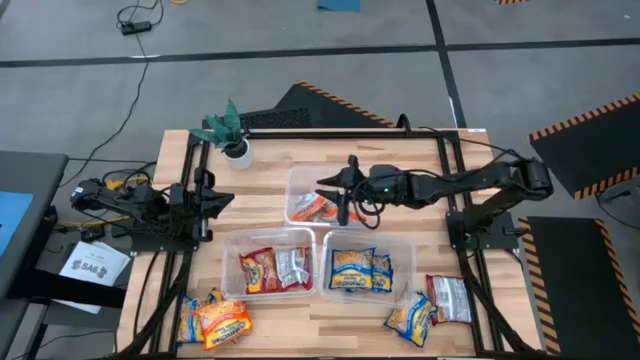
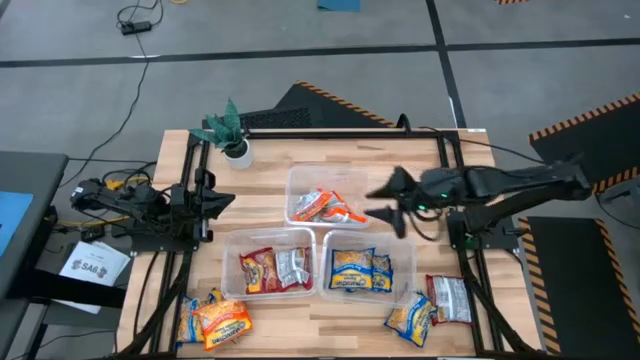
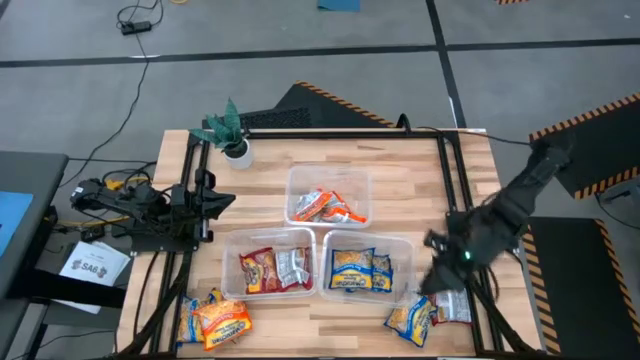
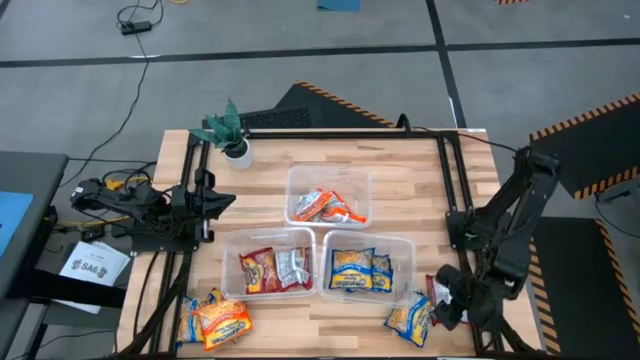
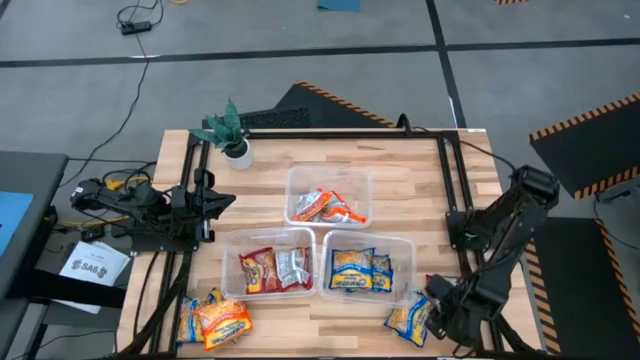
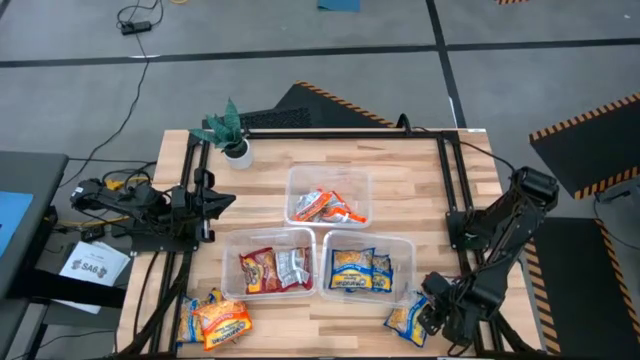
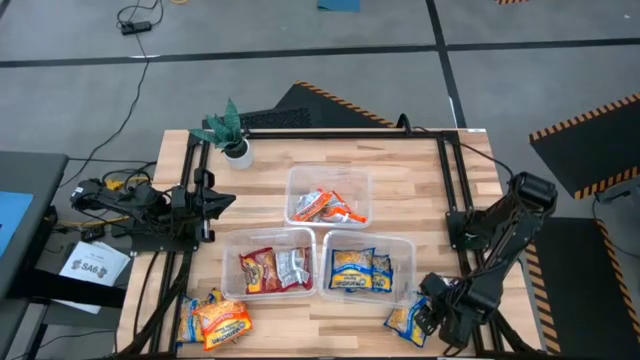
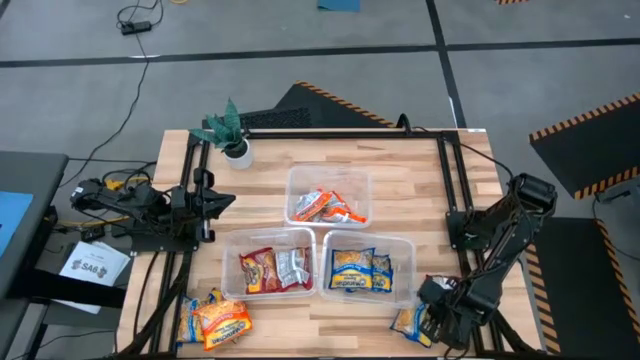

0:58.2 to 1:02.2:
Task: Sort Maruchan noodles
Put the blue noodle pack into the bottom right transparent bin

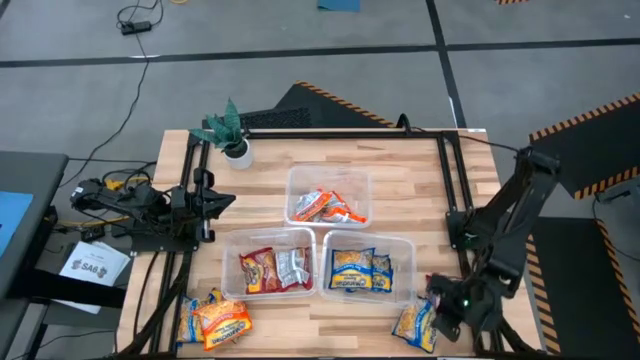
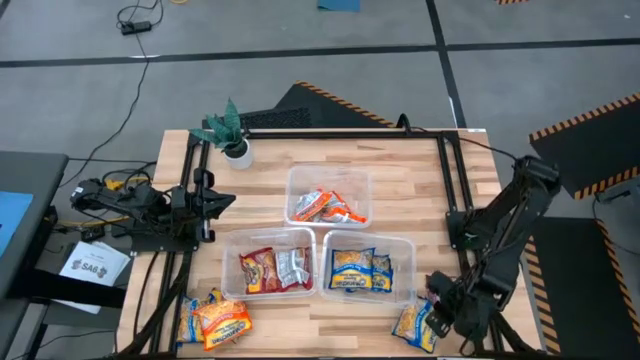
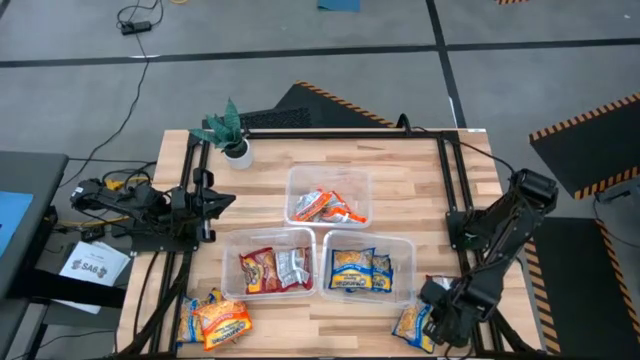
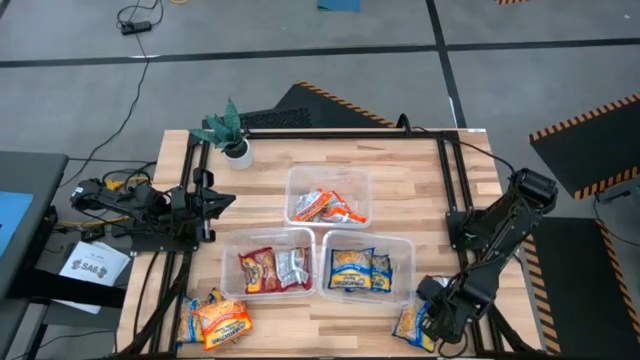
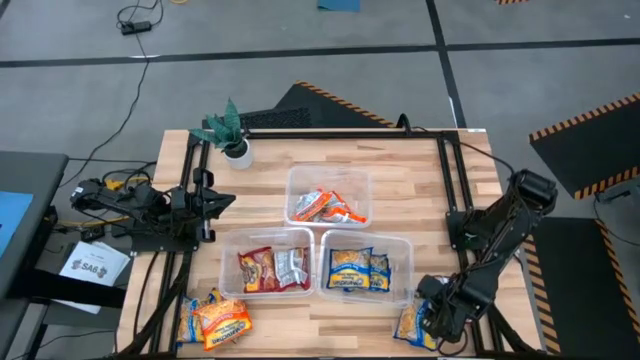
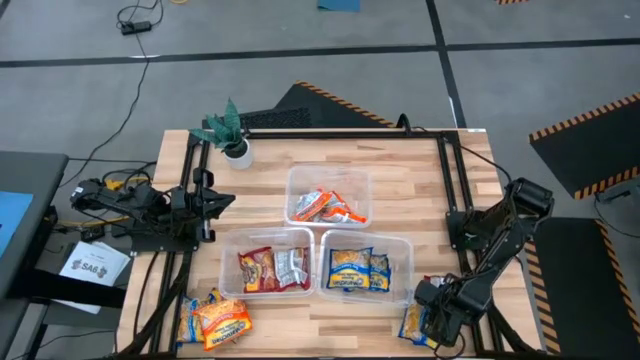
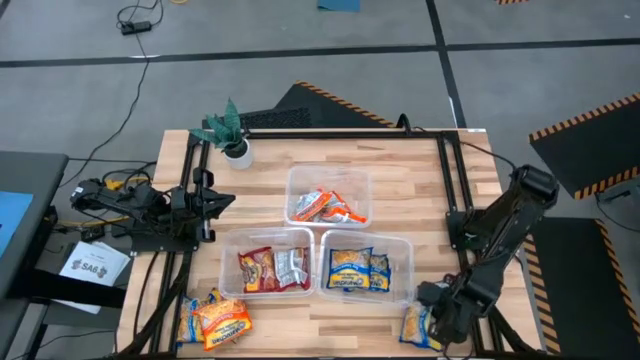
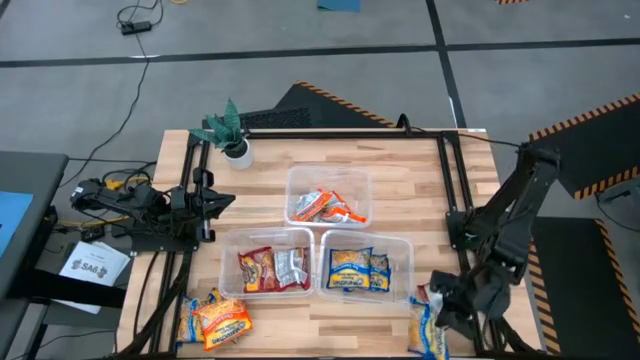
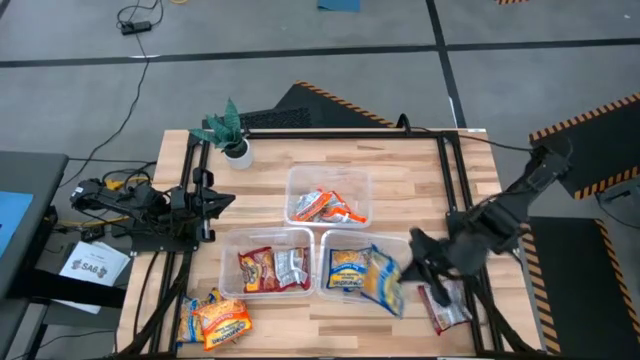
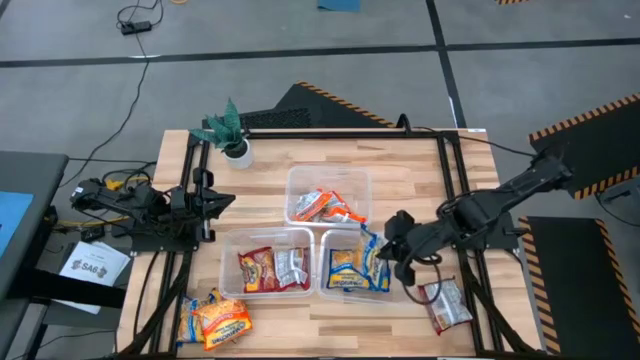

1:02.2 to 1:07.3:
Put the blue noodle pack into the bottom right transparent bin

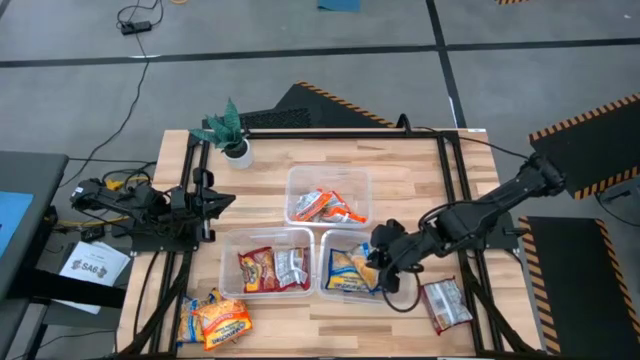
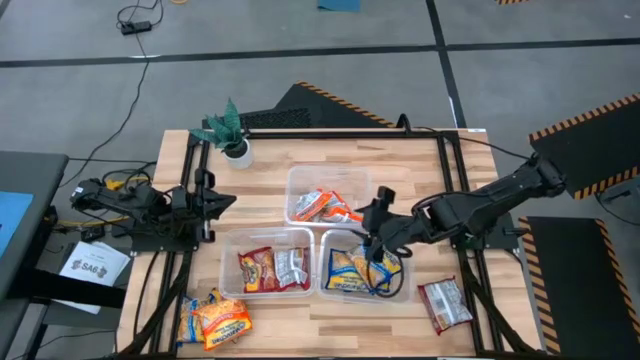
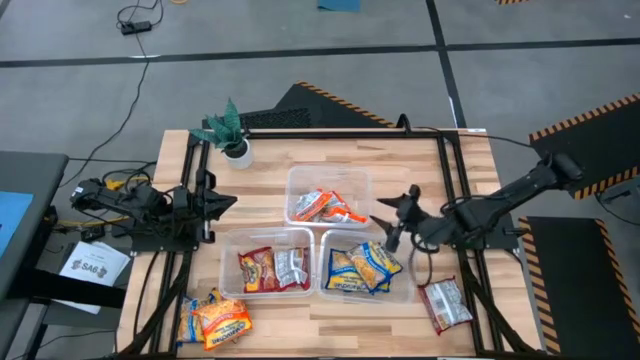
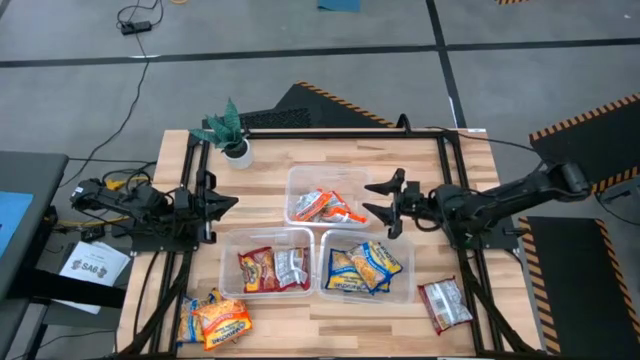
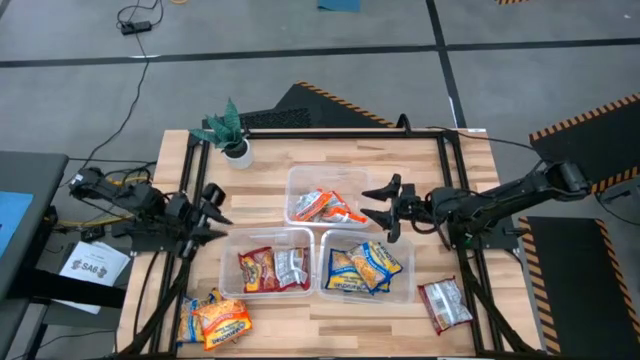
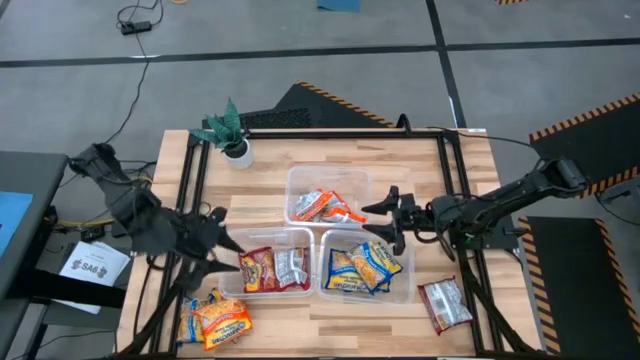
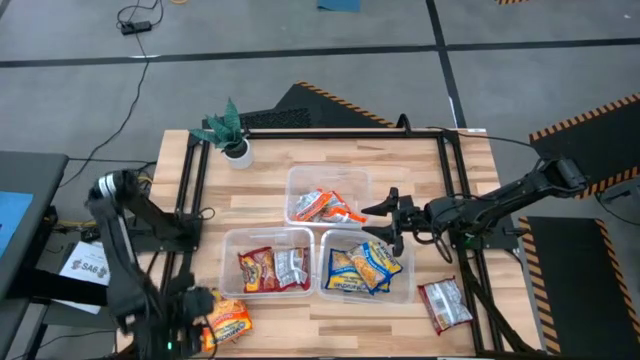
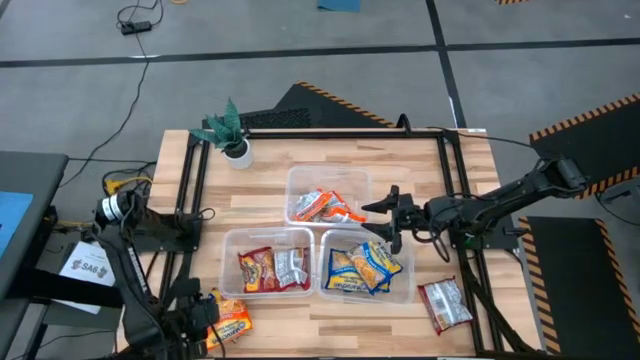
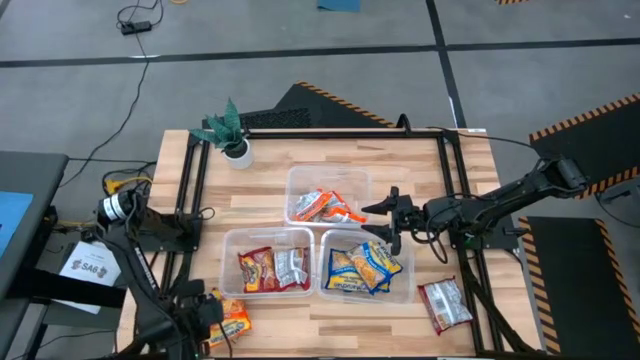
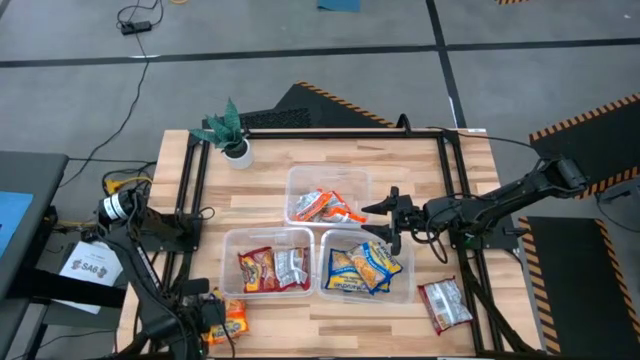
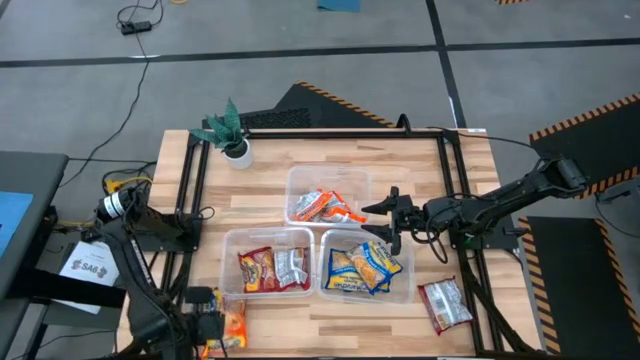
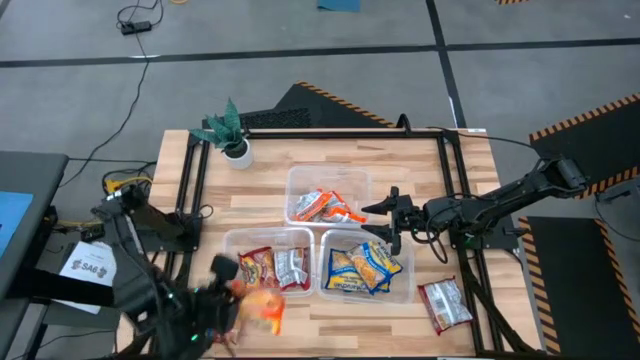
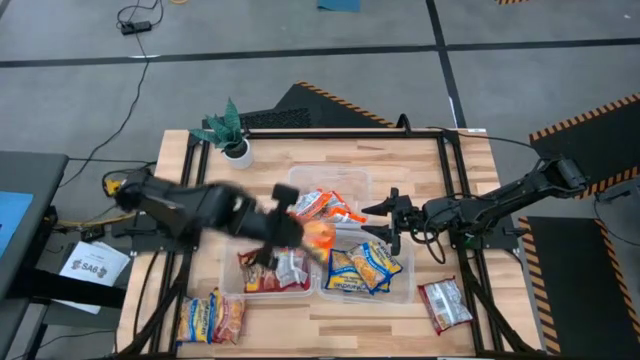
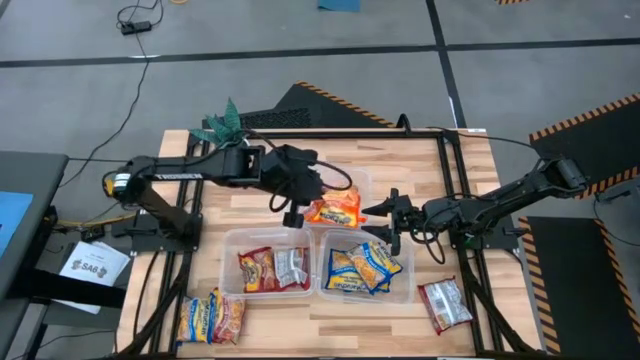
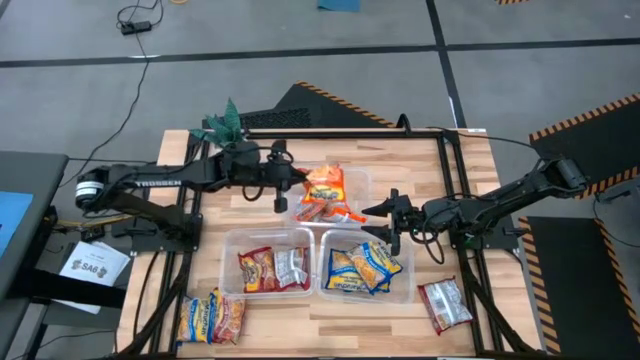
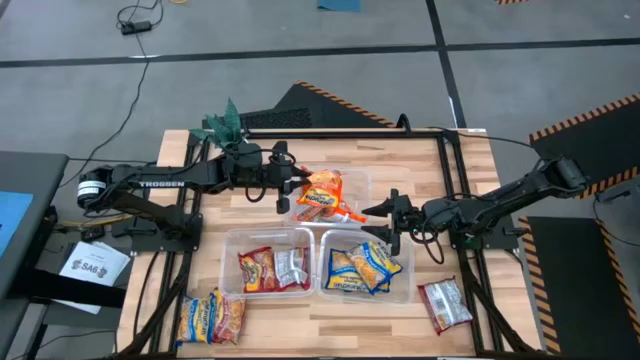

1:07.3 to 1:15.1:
Put the orange noodle pack into the top transparent bin

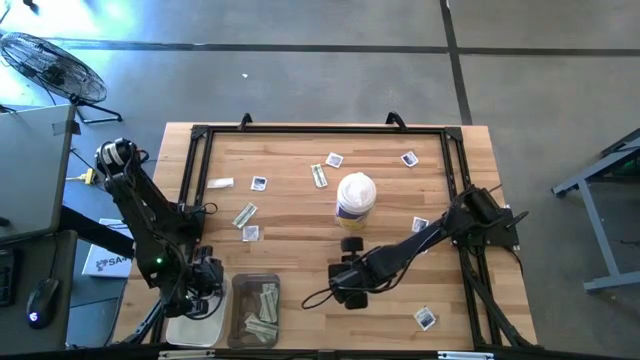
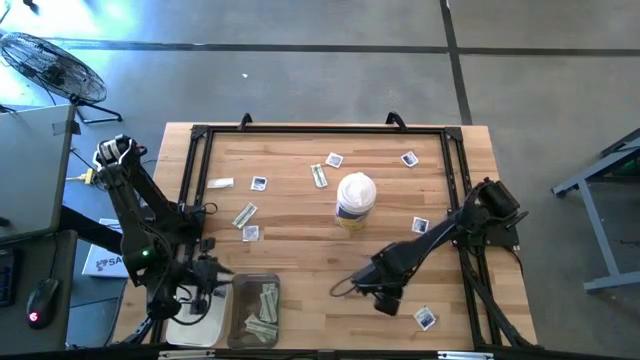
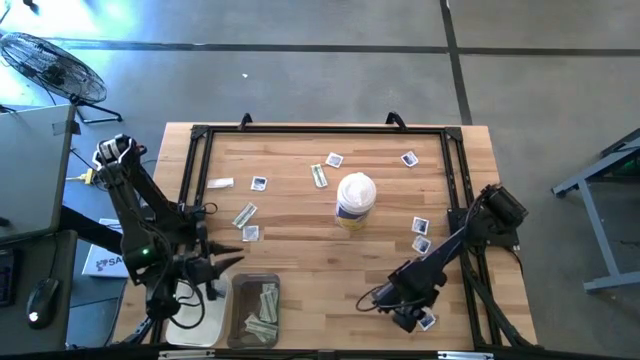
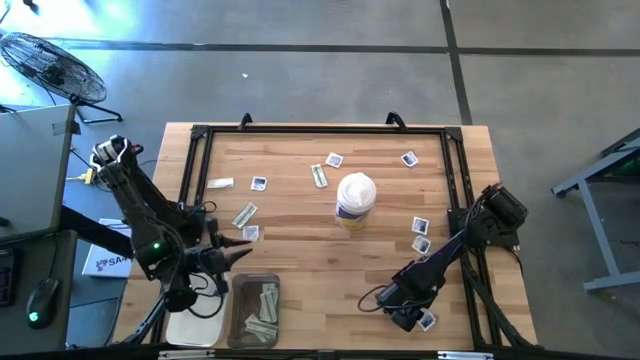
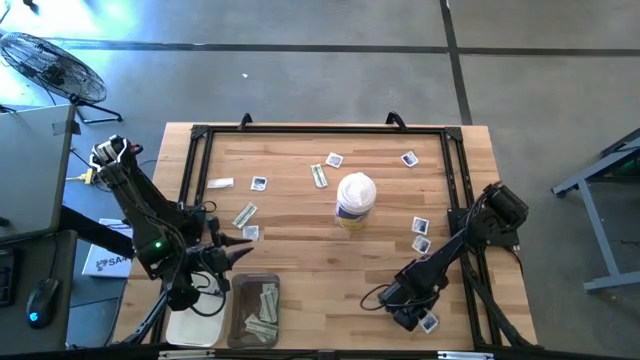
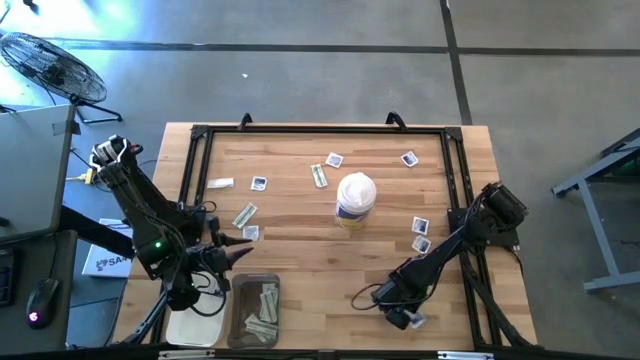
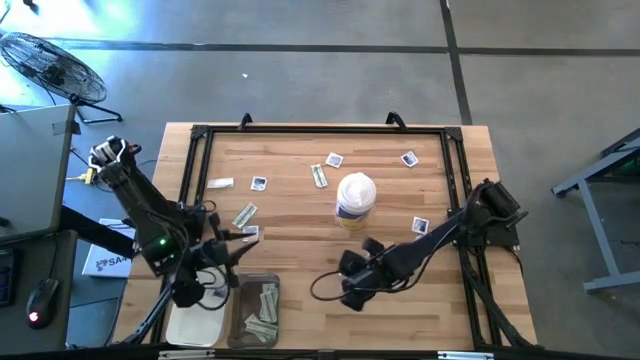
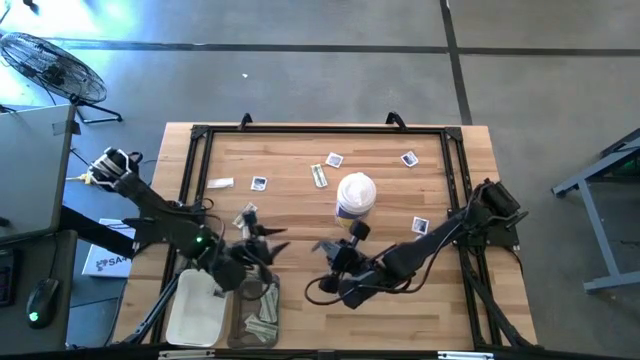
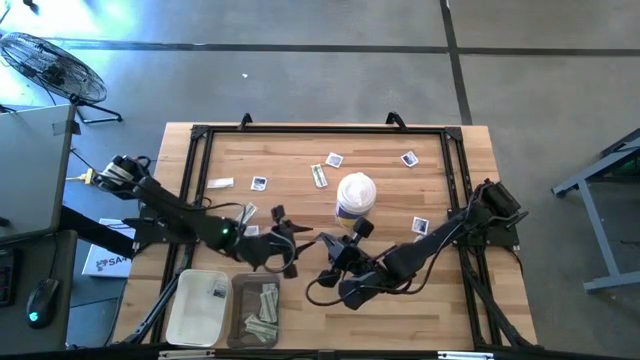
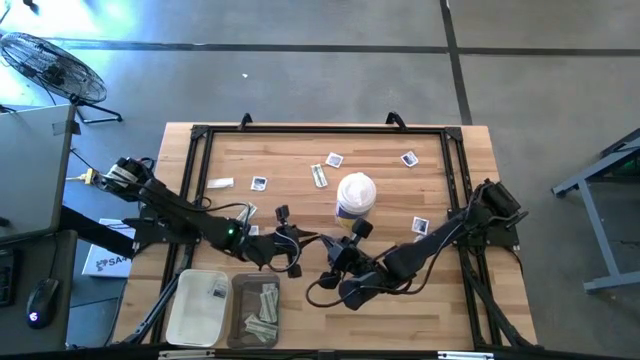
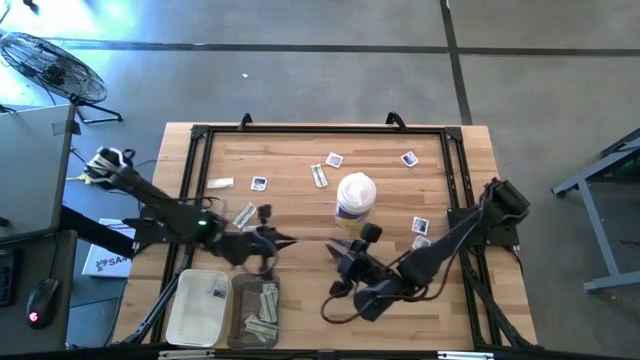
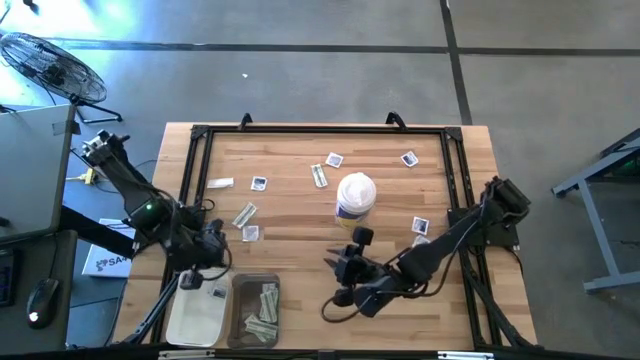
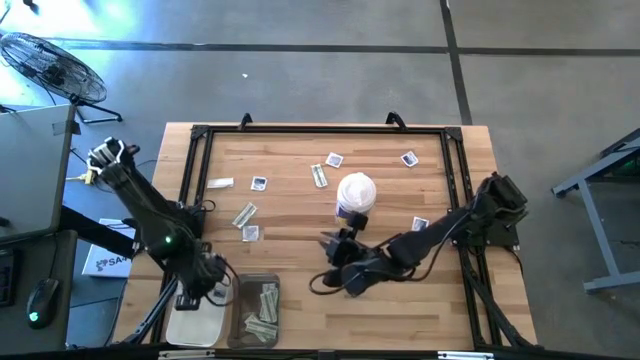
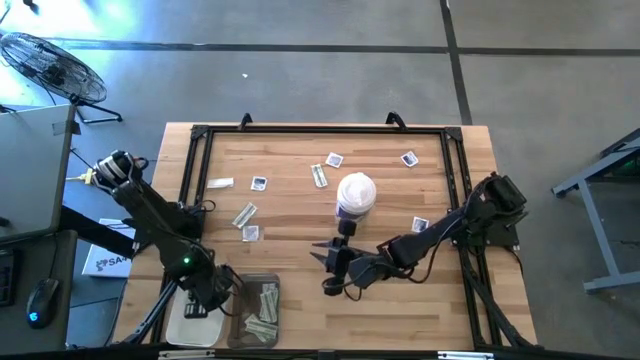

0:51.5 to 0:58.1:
Task: Pick & Place First Aid Supplies
Put the alcohol pad into the white bin
